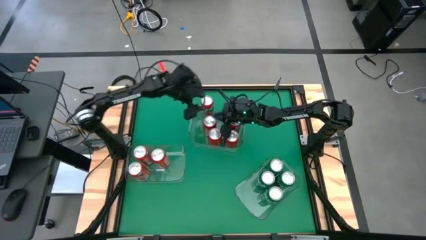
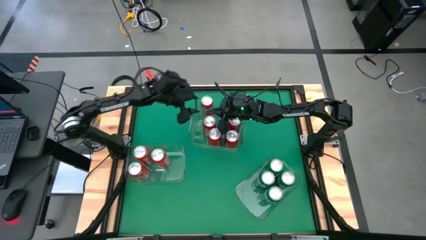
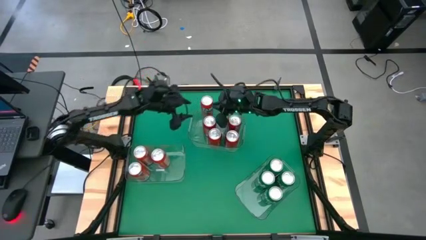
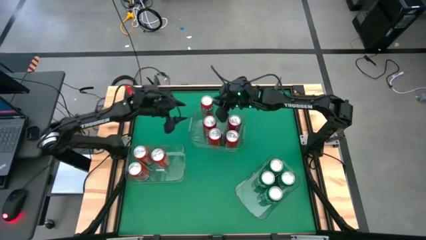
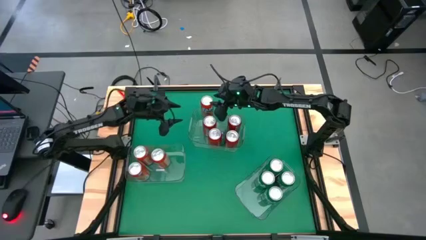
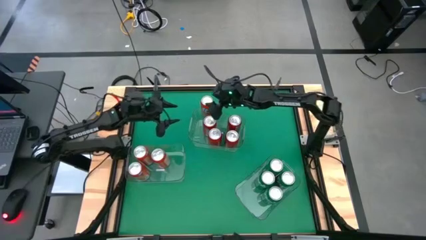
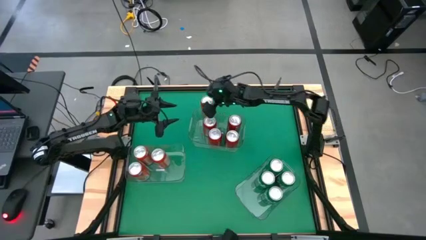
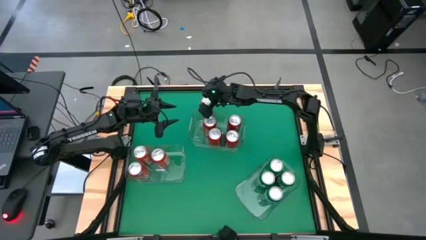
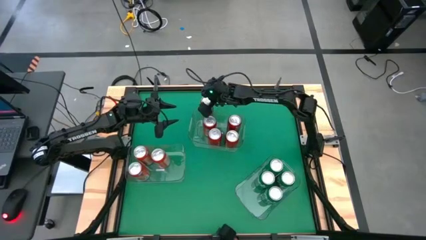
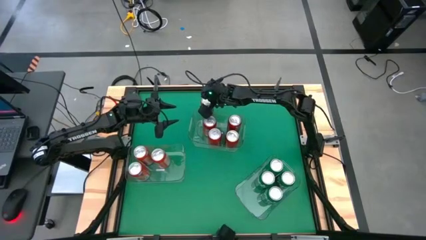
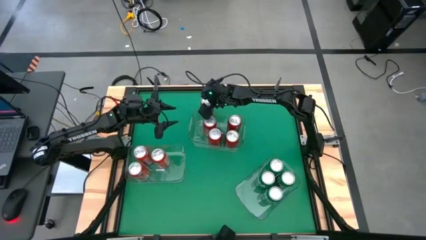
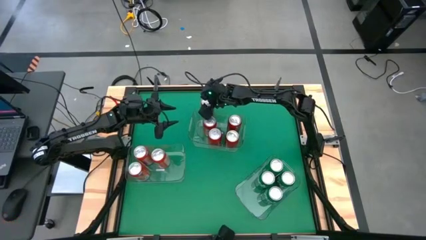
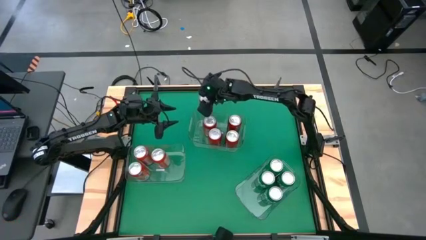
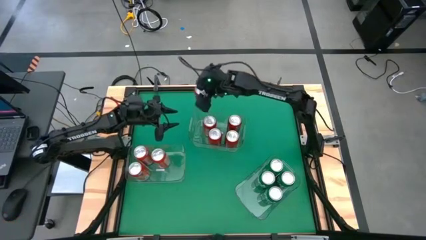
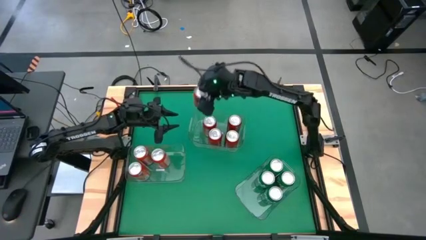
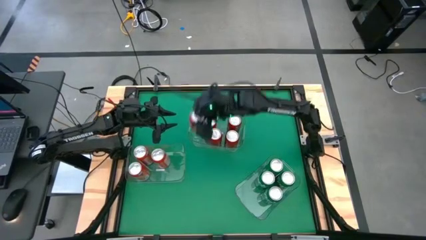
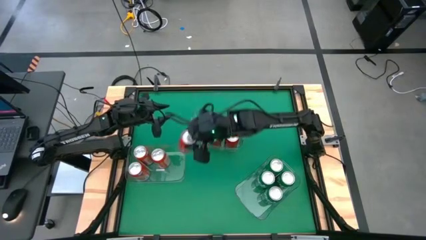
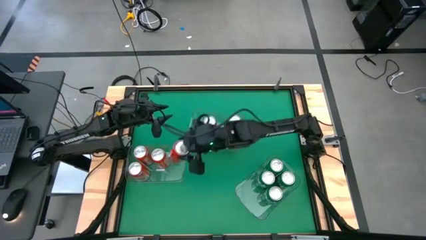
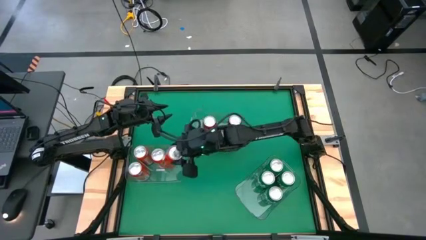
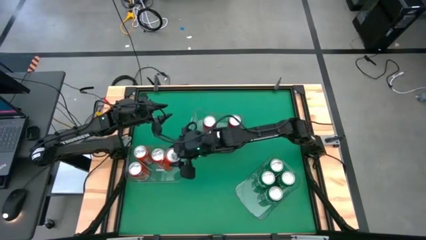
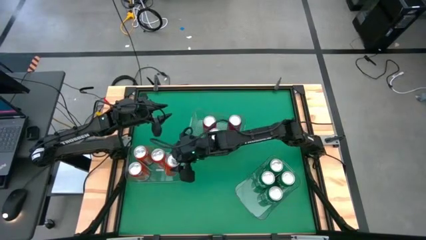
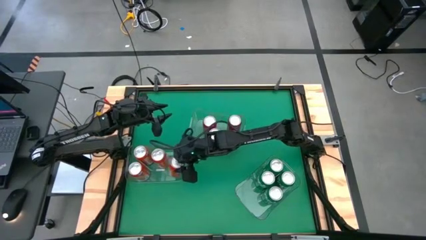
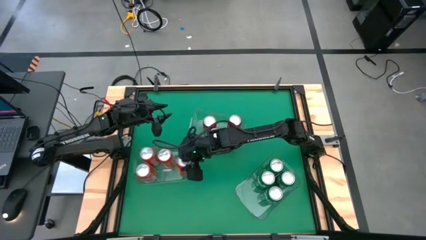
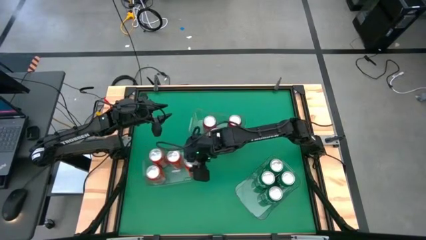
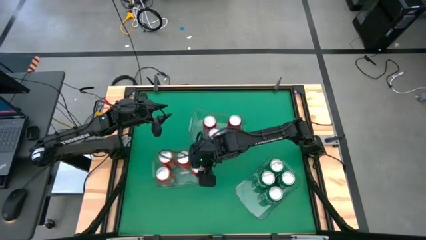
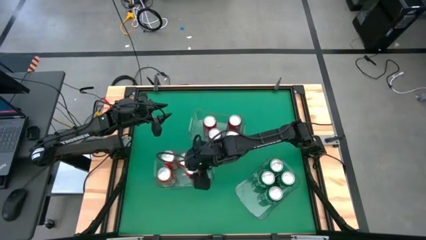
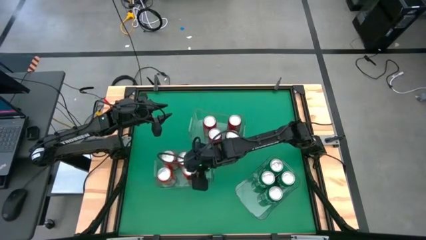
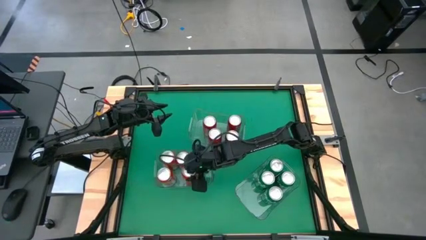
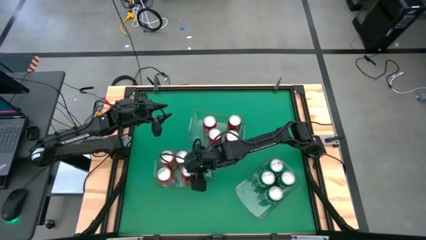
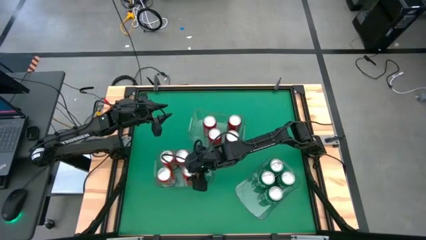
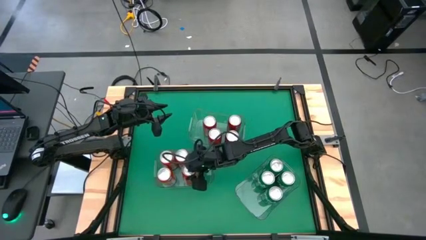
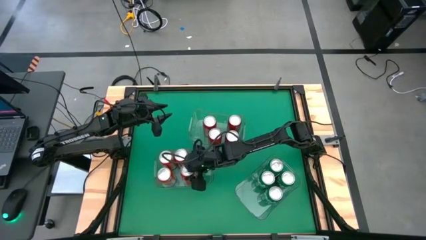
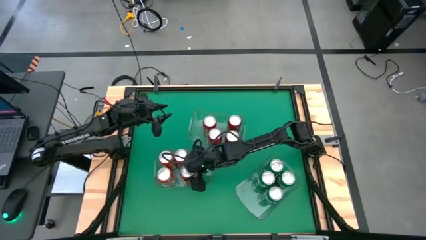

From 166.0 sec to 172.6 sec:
Task: Sort soda cans
Put the red soda can into the bottom left transparent bin

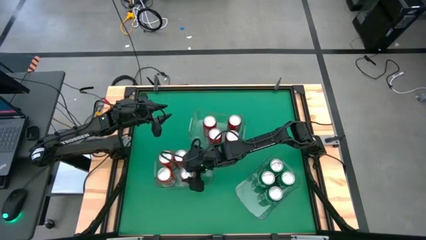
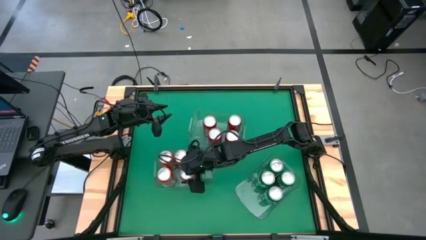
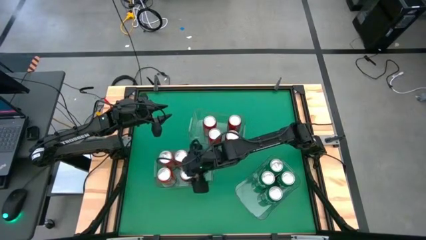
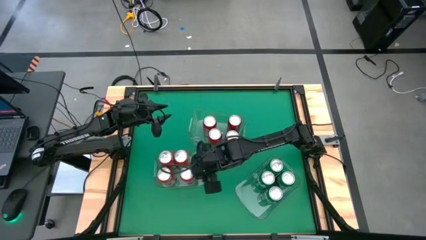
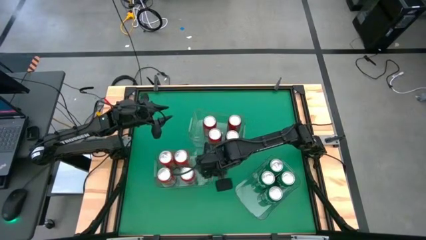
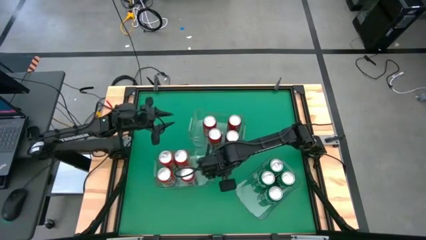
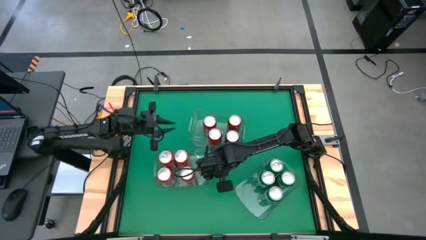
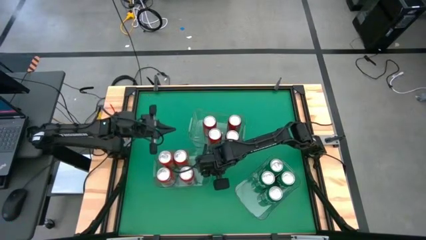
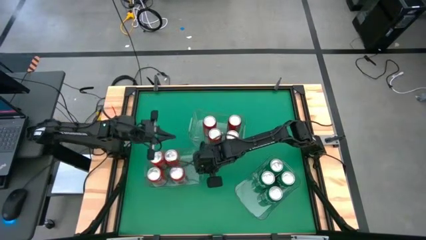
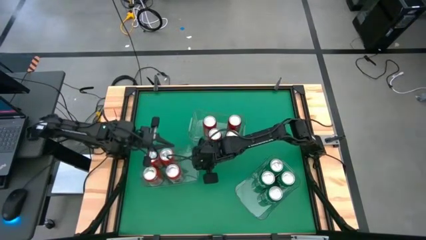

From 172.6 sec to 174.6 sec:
Adjust the bottom left transparent bin

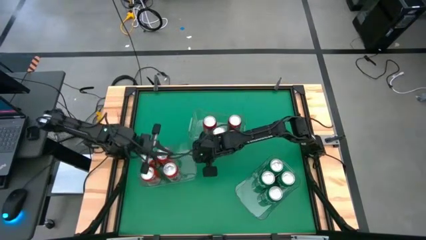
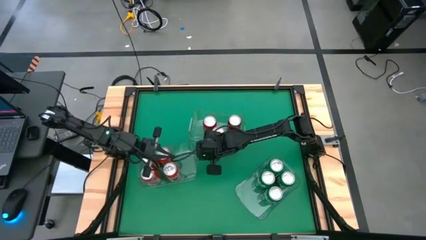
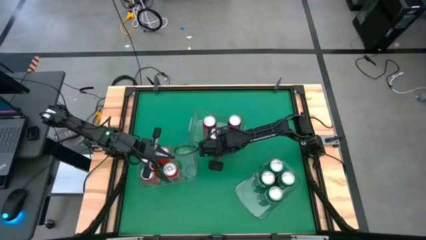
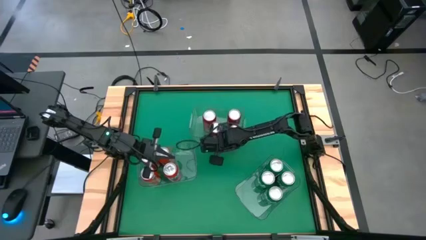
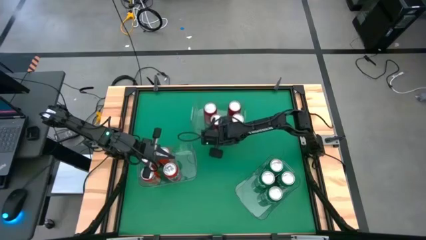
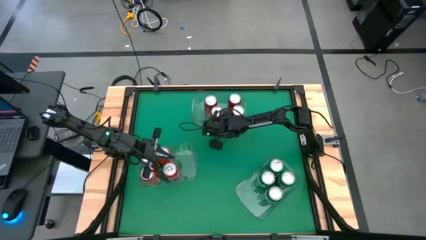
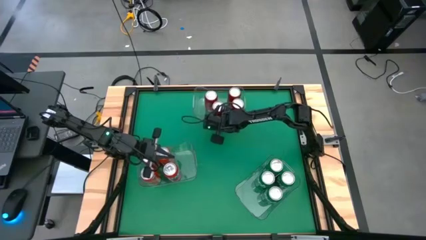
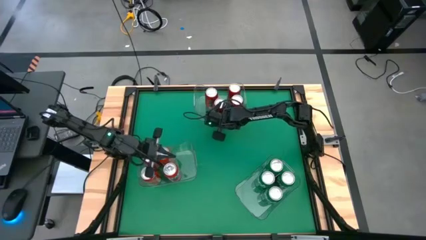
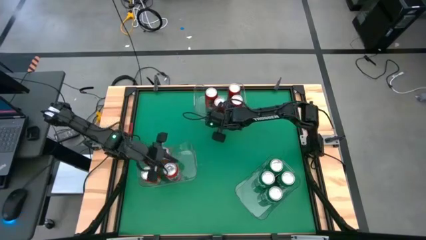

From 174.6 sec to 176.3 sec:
Move the top transparent bin to the top middle of the table

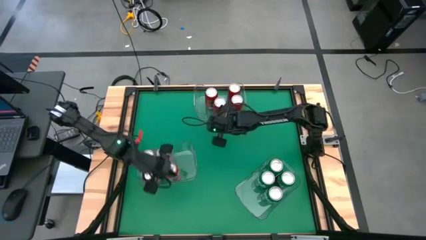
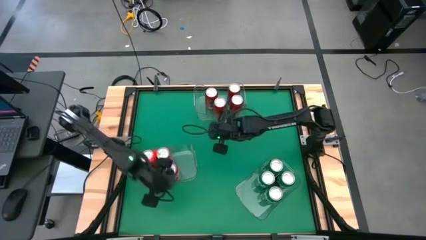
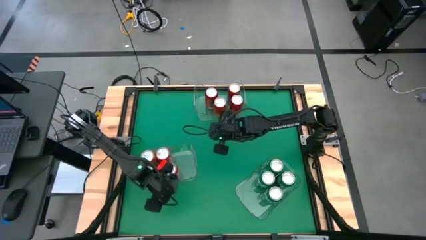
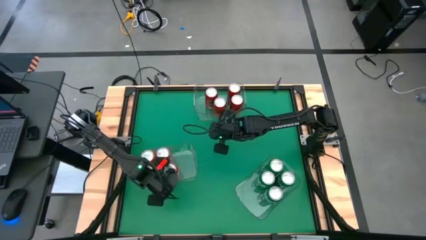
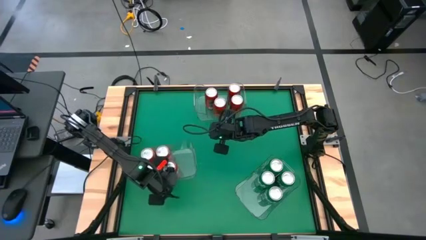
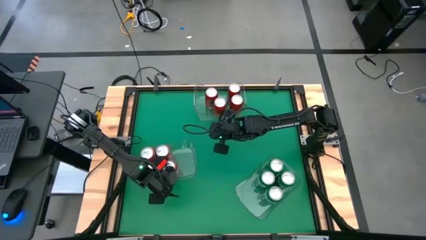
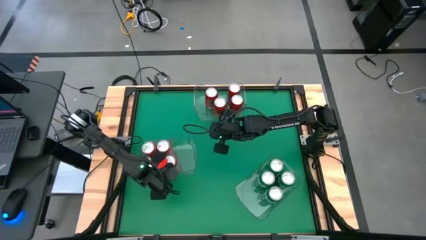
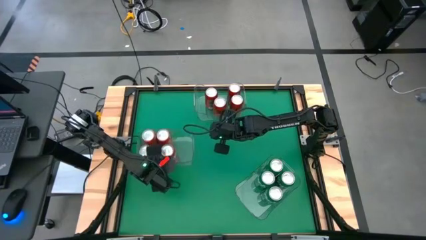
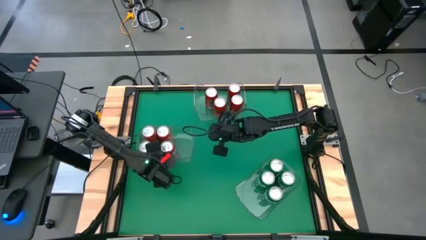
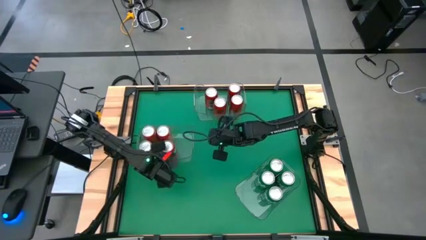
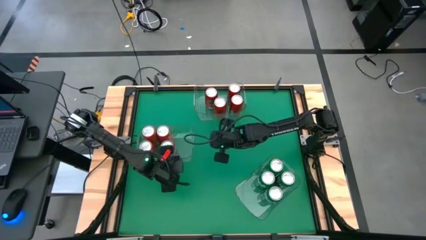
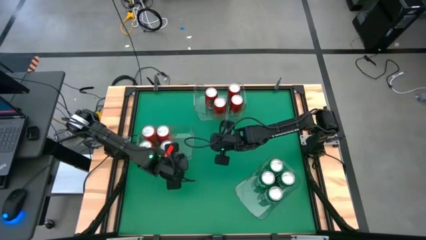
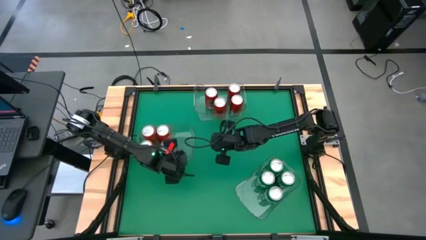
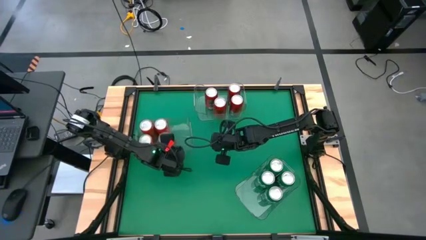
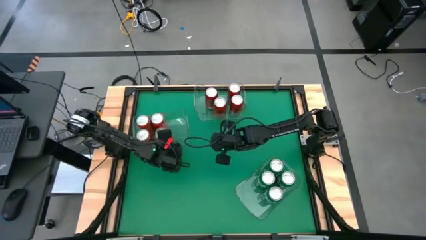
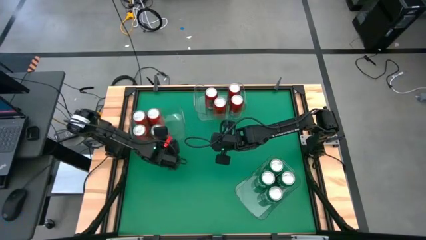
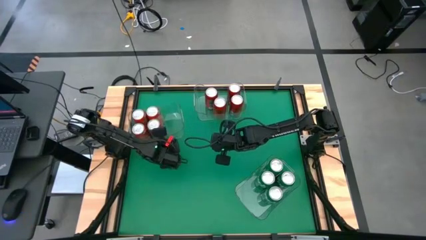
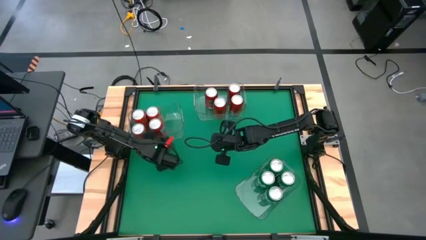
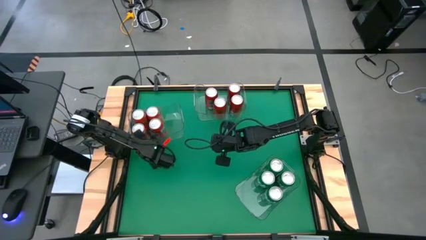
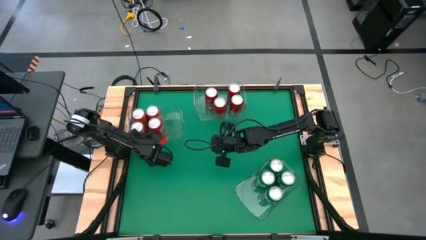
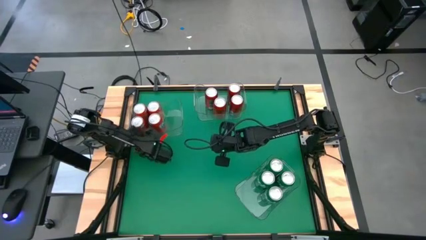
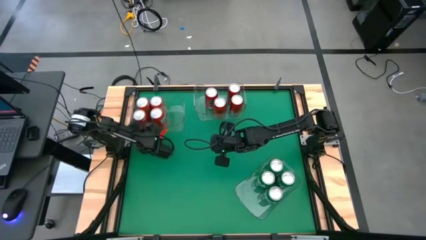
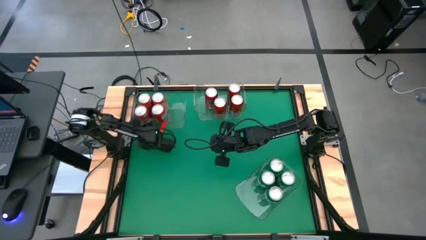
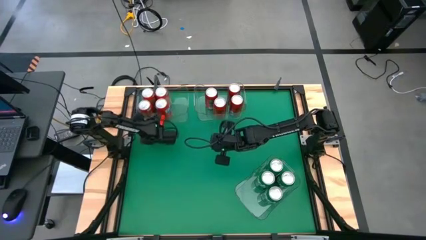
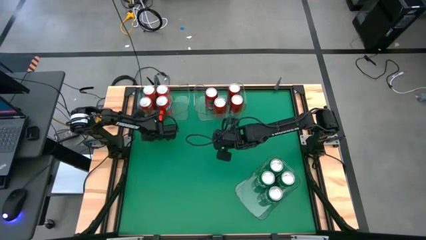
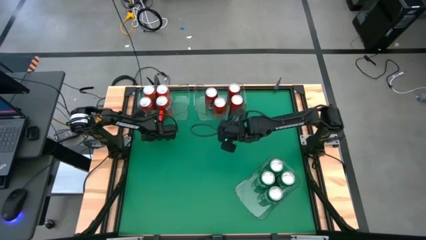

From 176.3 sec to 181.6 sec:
Move the left transparent bin to the top left of the table

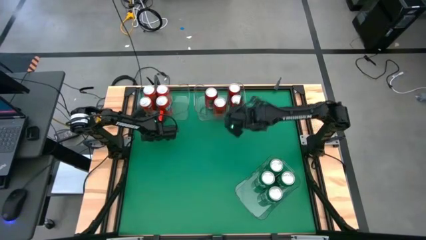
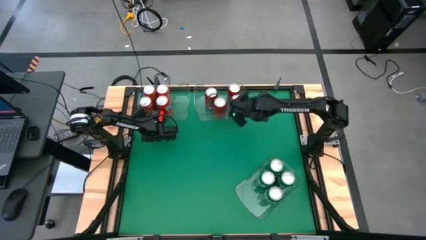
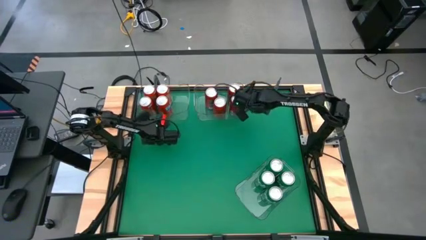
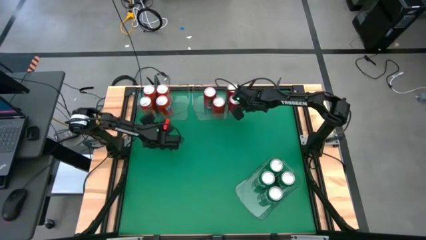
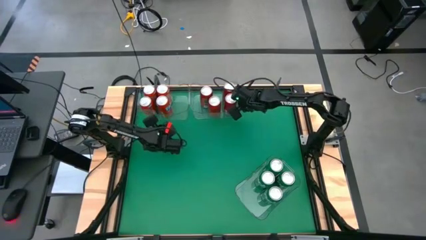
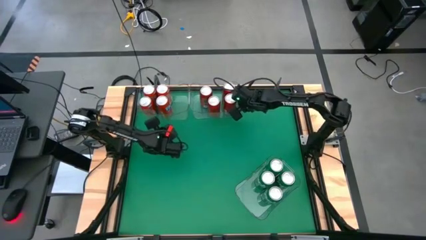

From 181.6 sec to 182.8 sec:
Adjust the top right transparent bin
